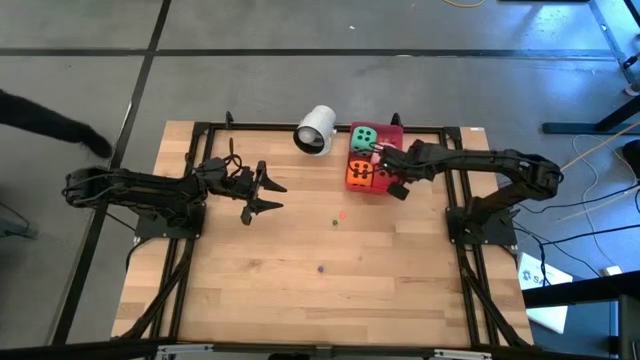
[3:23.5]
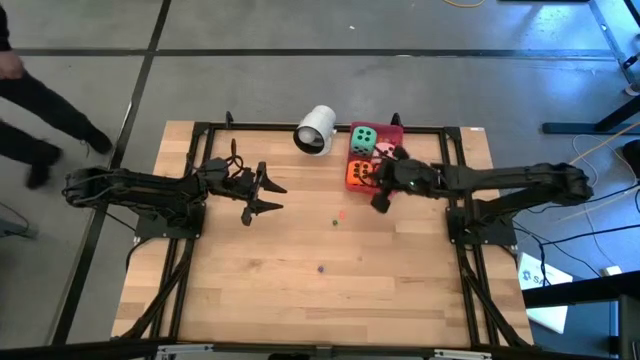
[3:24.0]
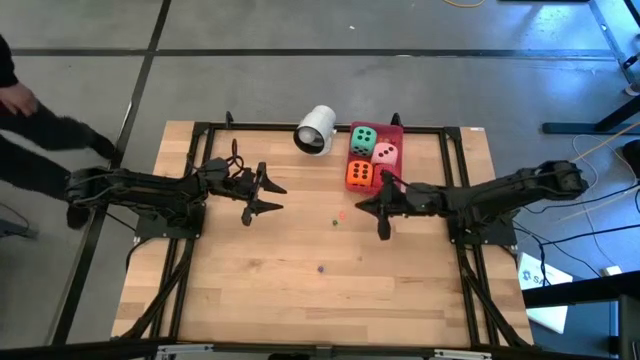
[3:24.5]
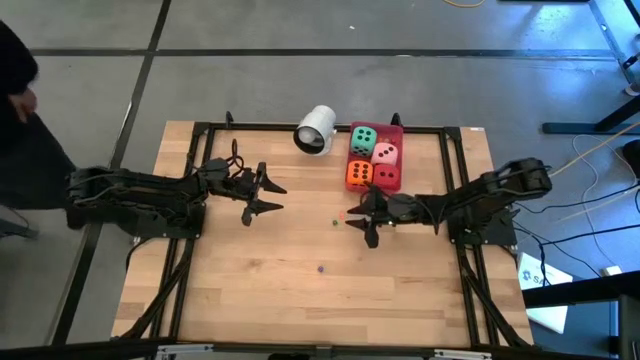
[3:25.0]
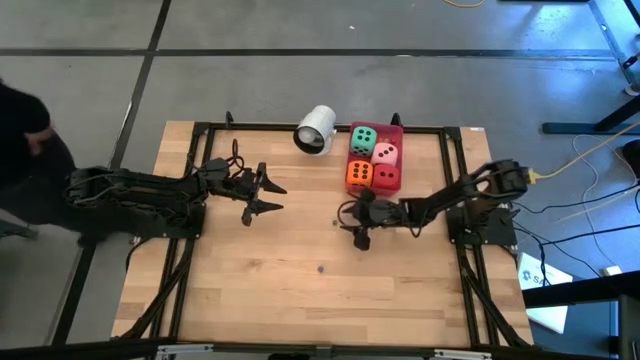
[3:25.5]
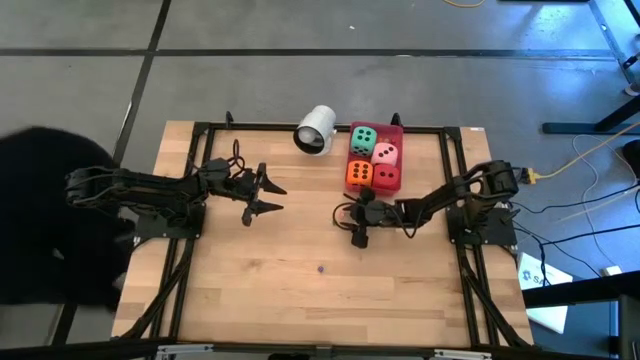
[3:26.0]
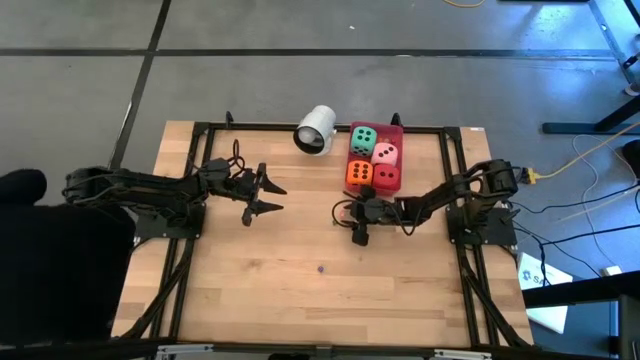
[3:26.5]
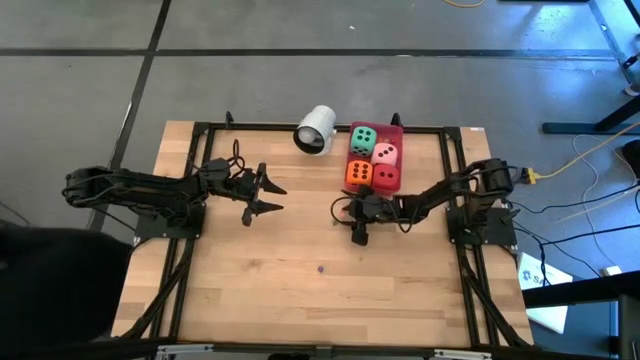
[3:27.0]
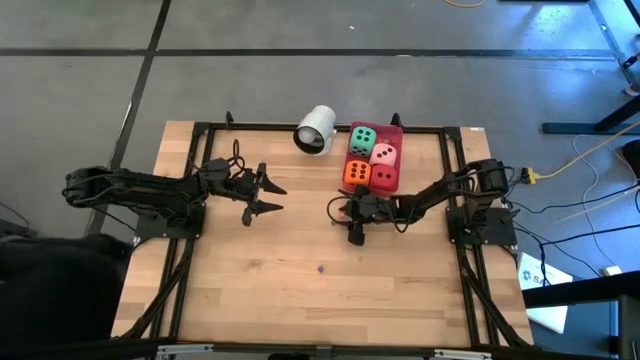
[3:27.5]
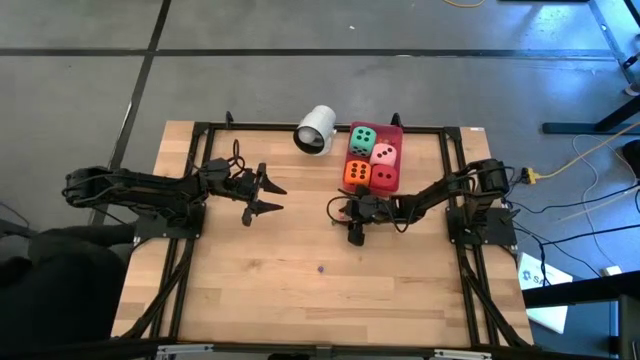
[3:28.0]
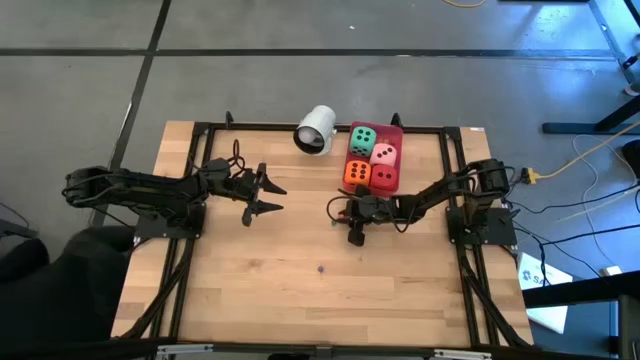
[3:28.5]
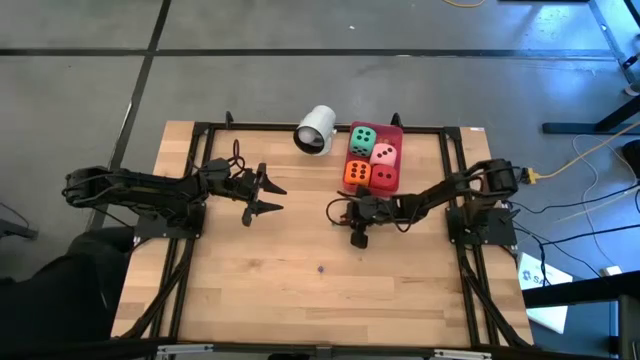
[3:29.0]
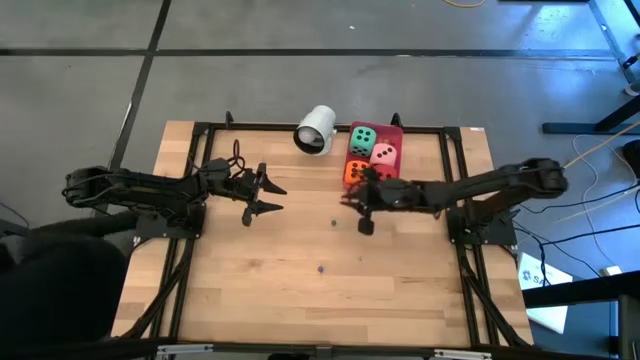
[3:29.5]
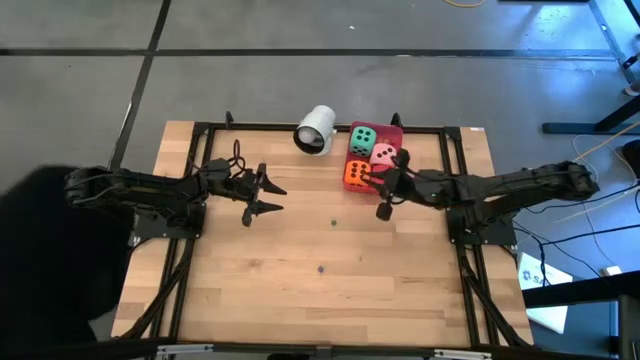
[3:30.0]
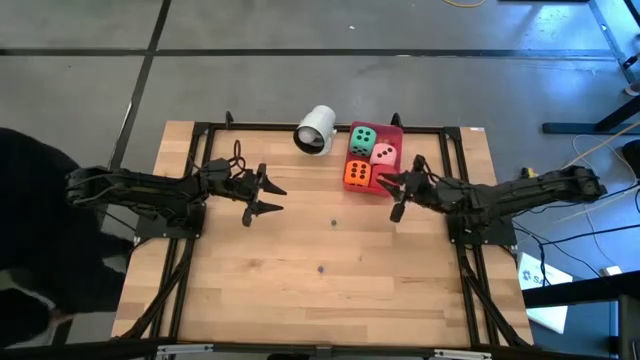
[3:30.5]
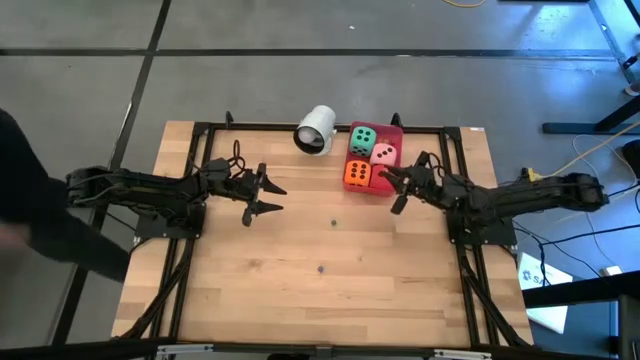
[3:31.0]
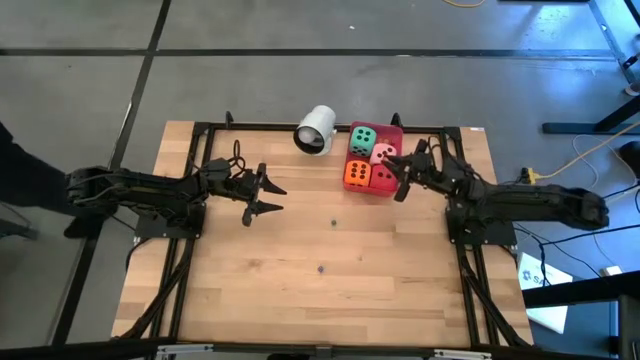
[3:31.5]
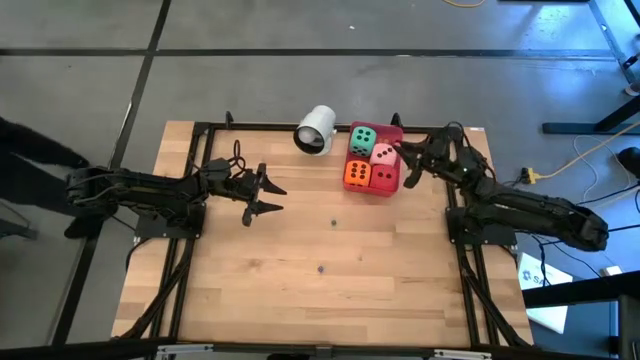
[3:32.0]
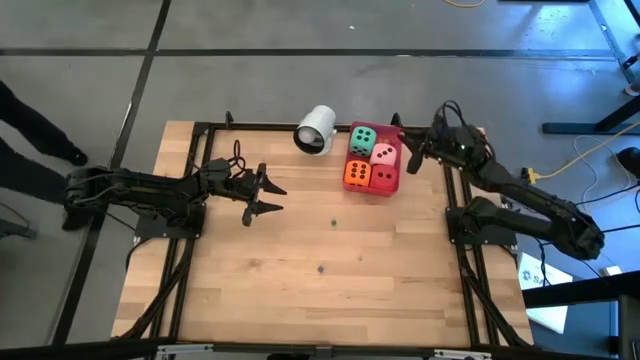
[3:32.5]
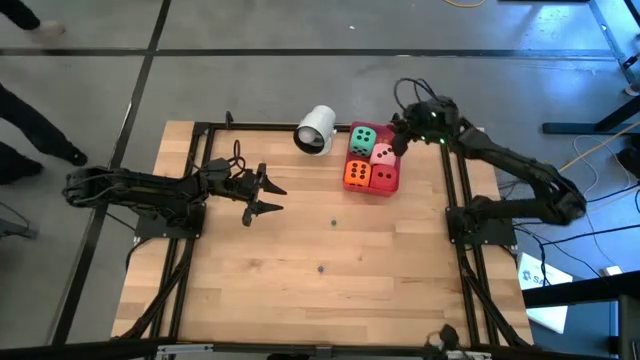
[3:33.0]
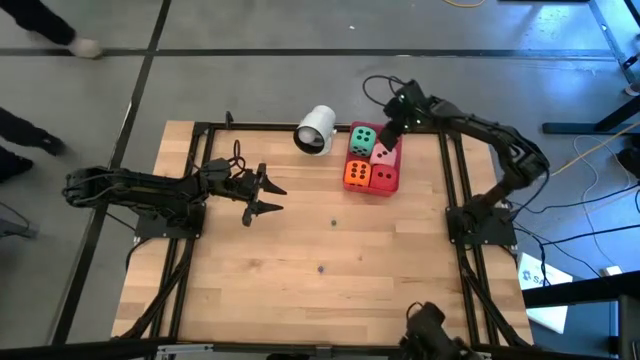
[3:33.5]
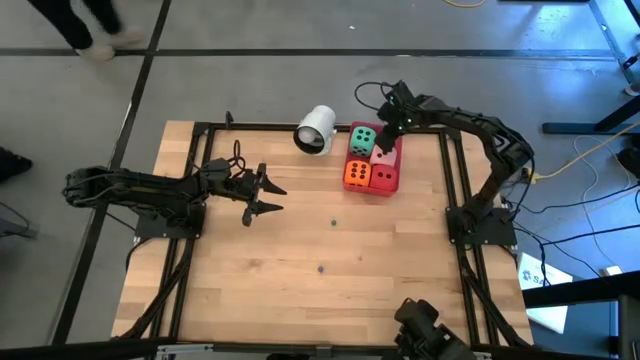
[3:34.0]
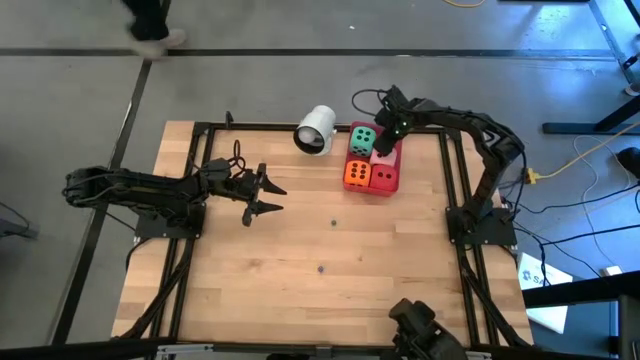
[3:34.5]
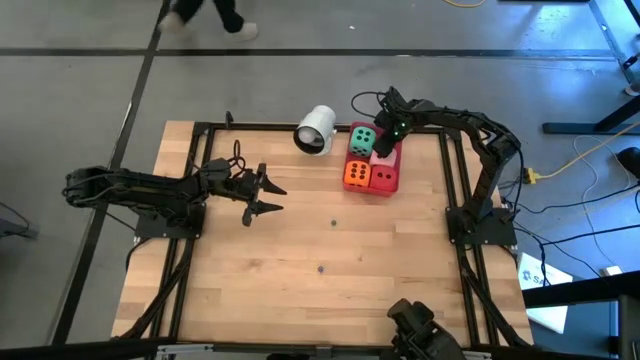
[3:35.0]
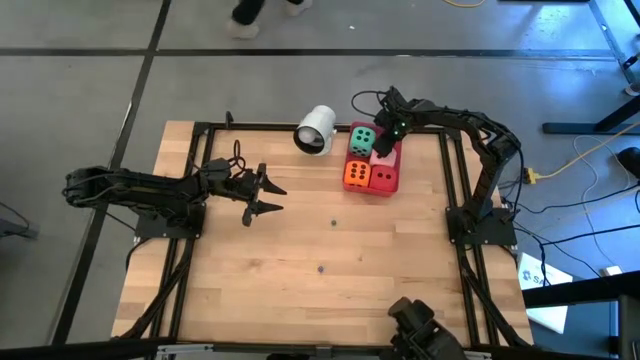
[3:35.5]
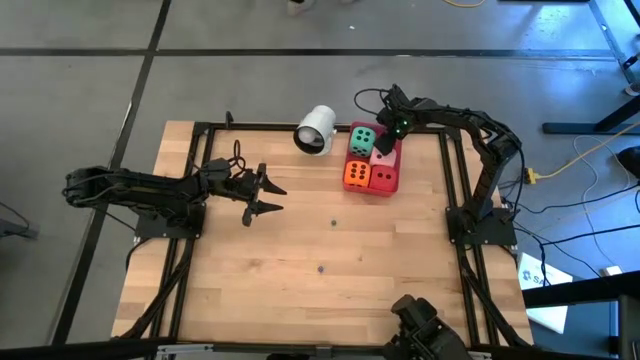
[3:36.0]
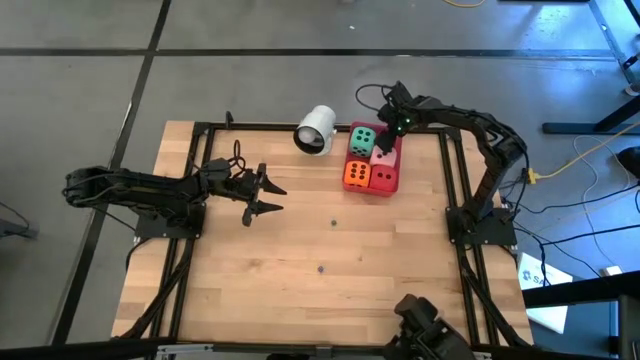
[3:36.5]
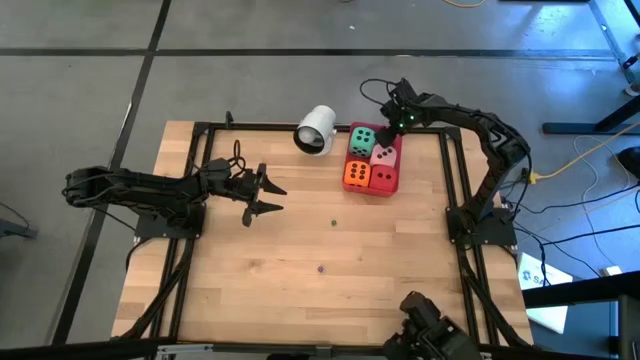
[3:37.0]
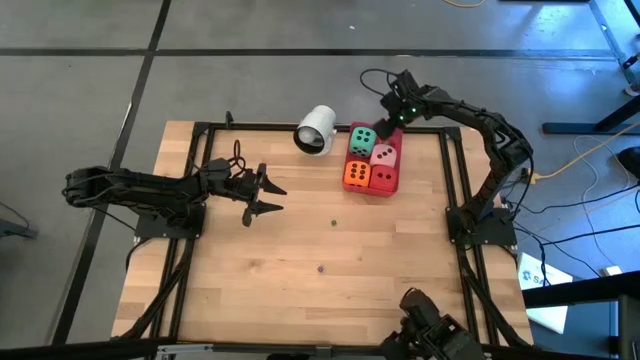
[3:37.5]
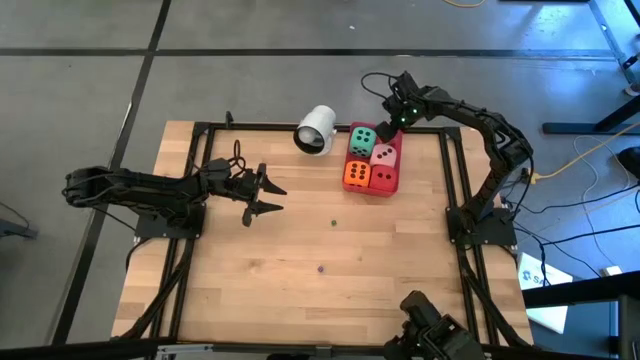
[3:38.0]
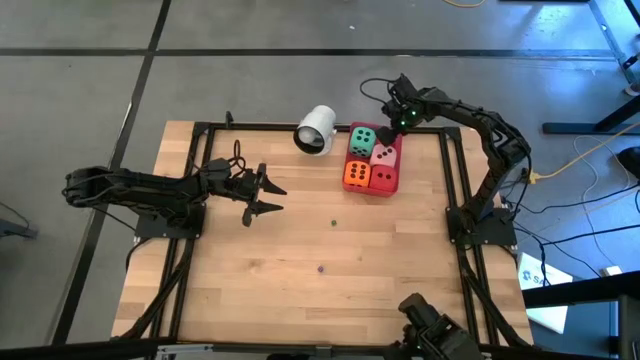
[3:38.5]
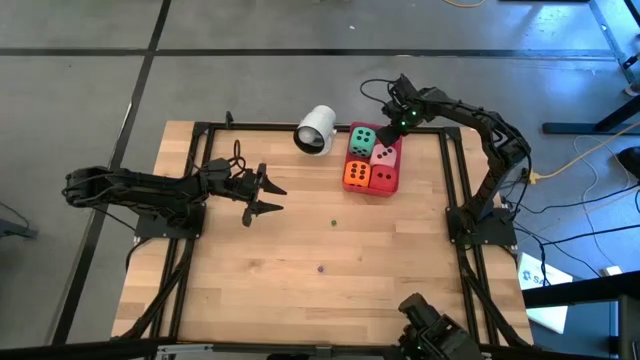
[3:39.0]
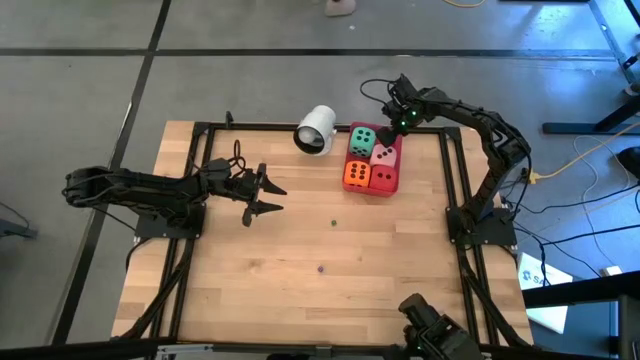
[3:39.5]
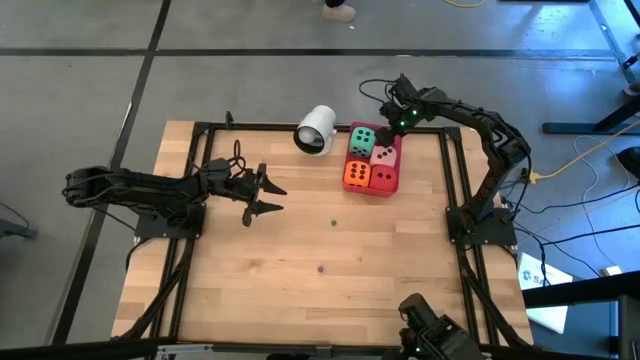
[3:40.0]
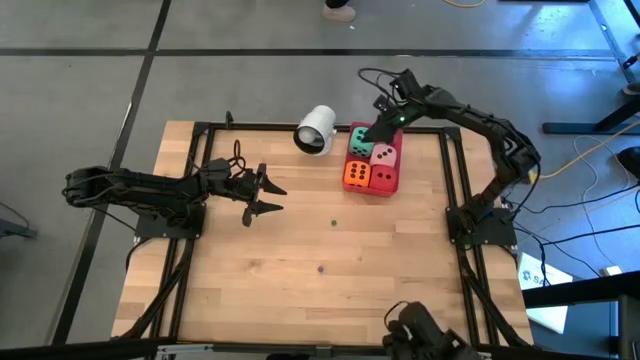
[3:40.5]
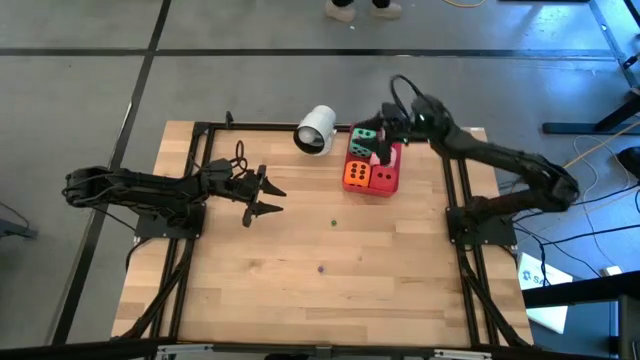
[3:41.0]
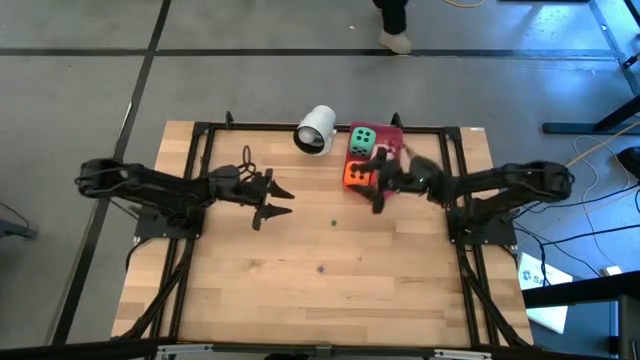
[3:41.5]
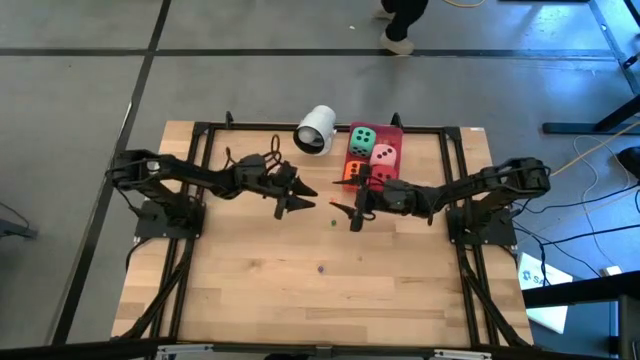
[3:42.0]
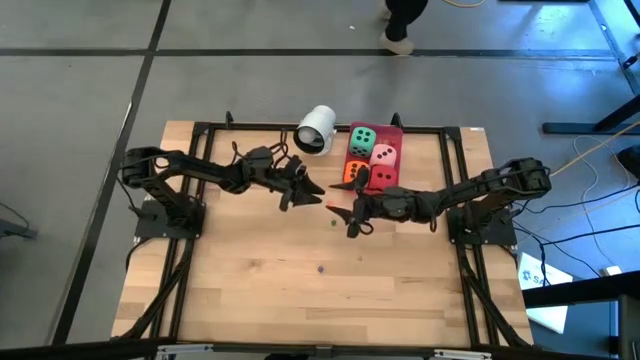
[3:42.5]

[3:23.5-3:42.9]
Task: Pick & Place Dice
Put the small orange dice into the red bin

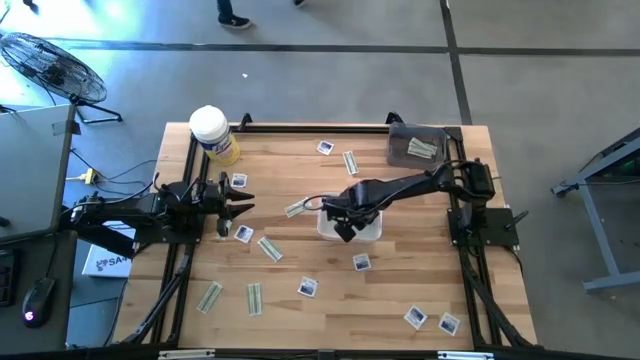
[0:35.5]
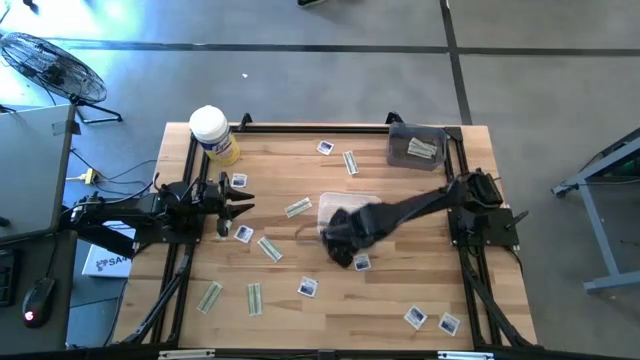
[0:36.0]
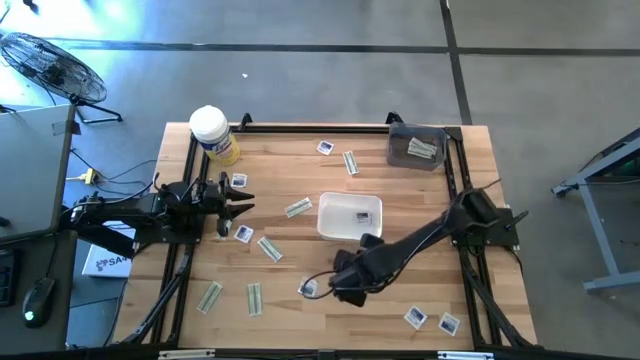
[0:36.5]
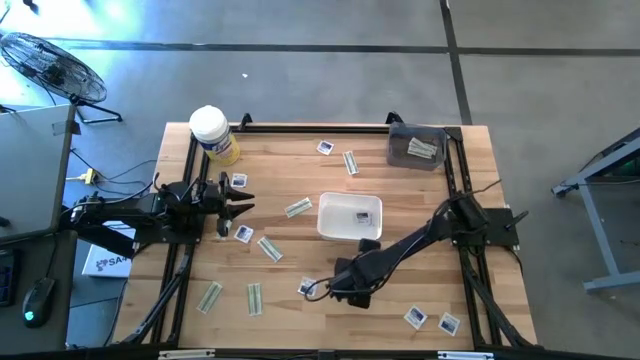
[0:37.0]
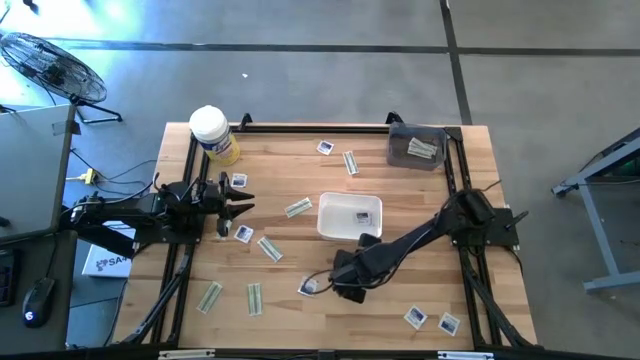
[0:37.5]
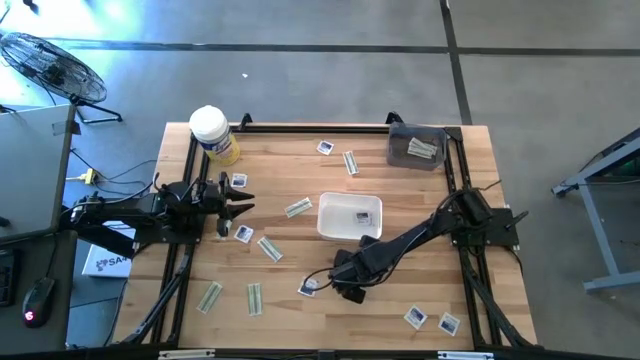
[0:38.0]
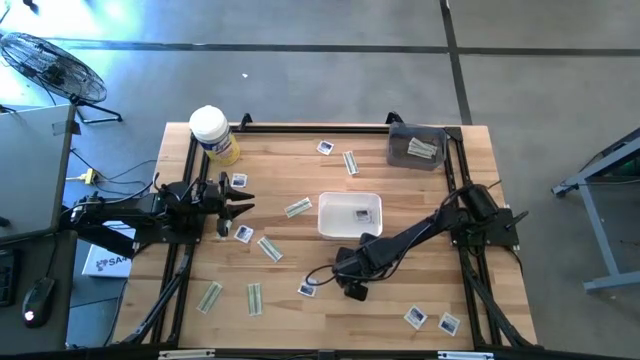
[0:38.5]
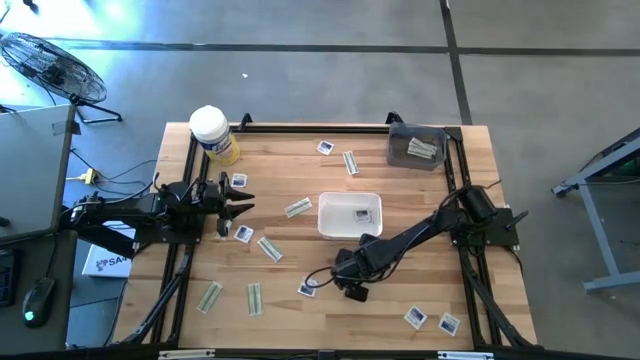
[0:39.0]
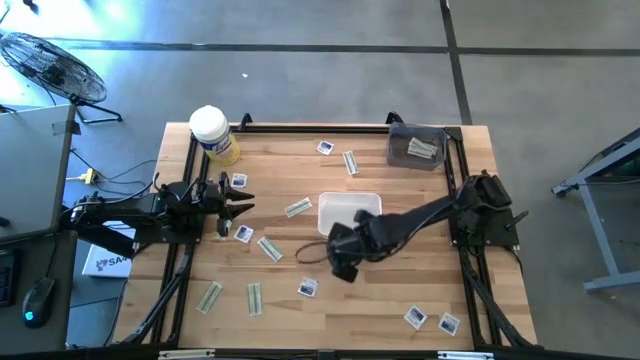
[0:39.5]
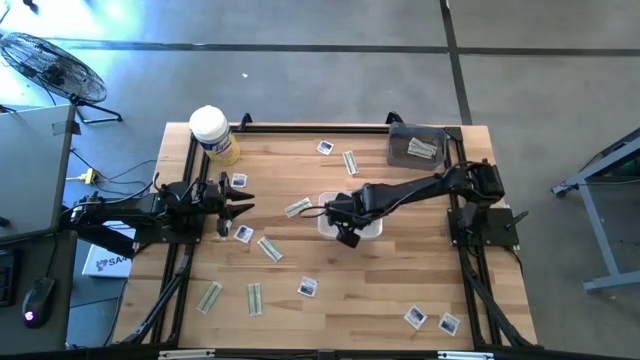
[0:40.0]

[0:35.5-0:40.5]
Task: Pick & Place First Aid Supplies
Put the blue alcohol pad into the white bin
